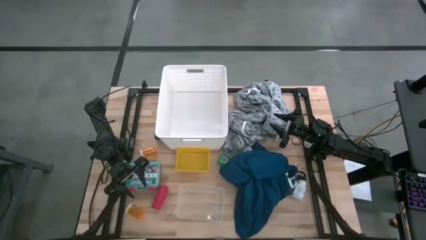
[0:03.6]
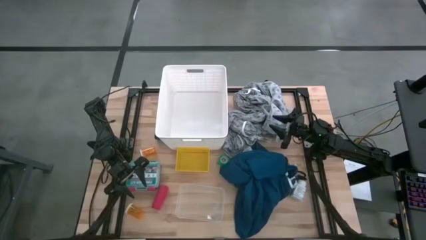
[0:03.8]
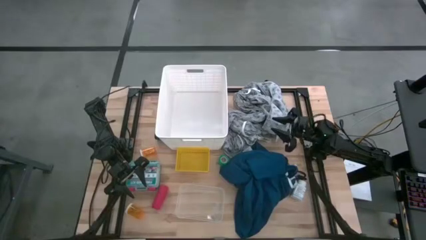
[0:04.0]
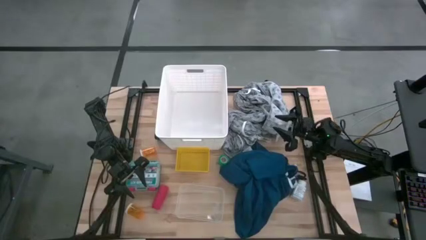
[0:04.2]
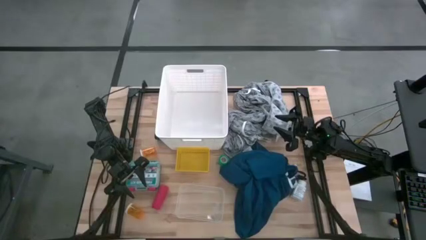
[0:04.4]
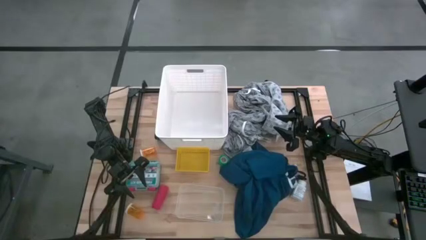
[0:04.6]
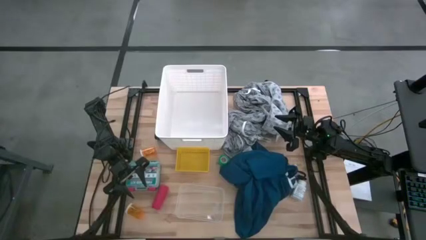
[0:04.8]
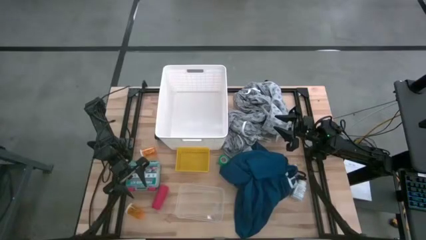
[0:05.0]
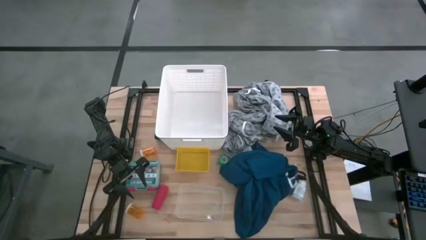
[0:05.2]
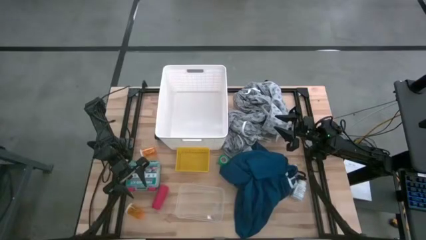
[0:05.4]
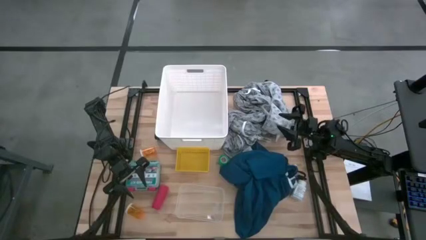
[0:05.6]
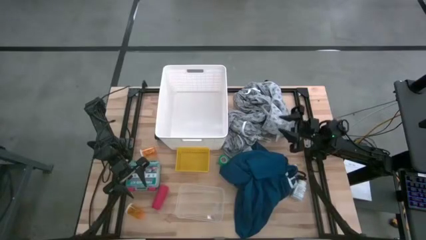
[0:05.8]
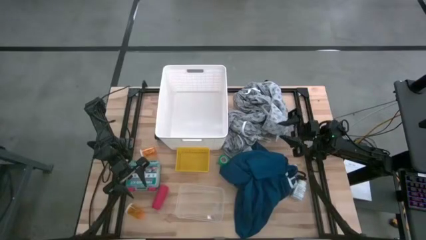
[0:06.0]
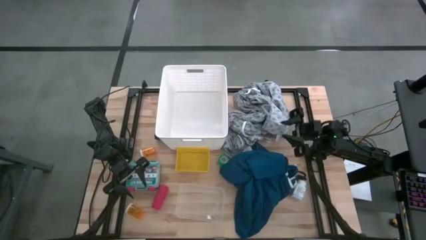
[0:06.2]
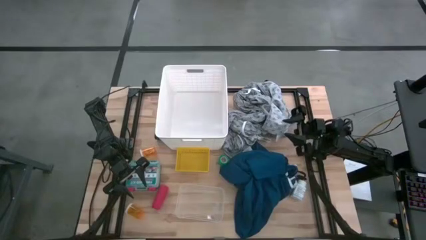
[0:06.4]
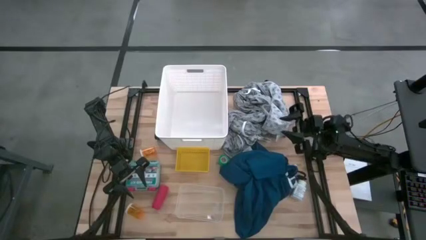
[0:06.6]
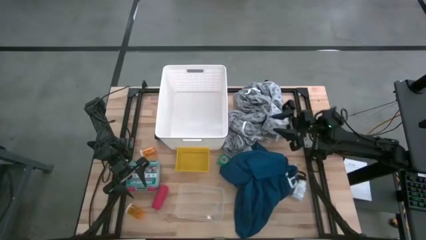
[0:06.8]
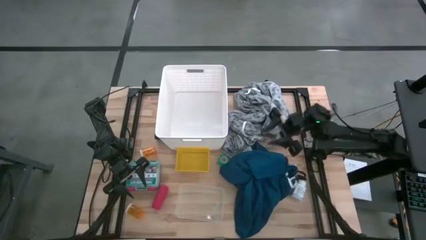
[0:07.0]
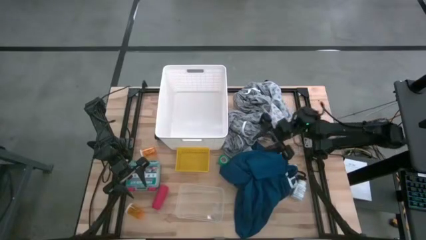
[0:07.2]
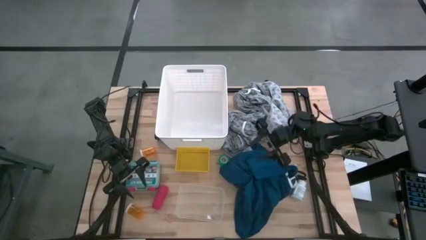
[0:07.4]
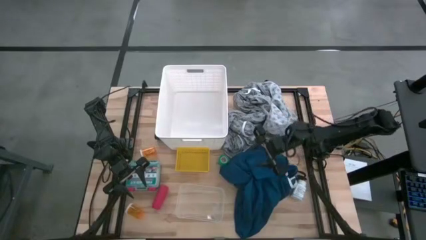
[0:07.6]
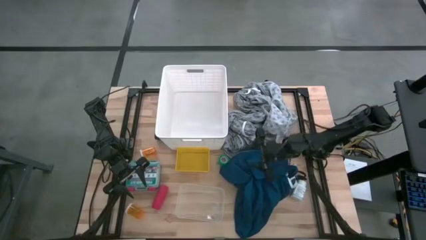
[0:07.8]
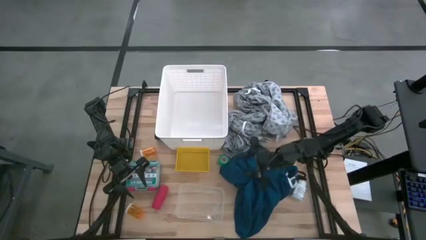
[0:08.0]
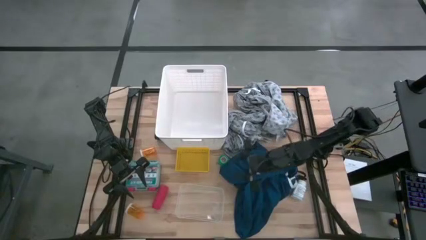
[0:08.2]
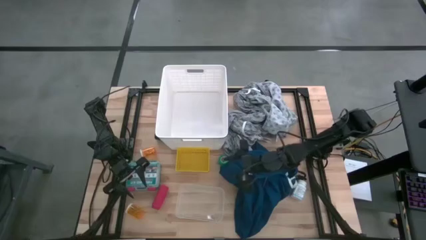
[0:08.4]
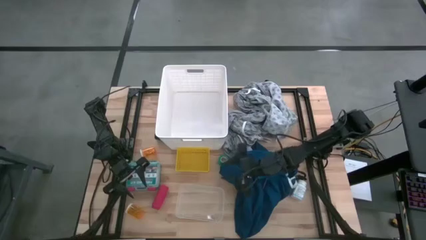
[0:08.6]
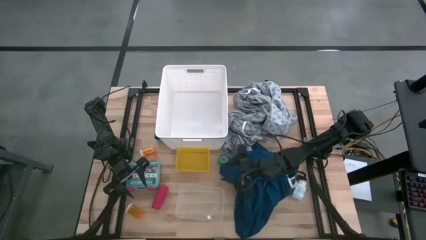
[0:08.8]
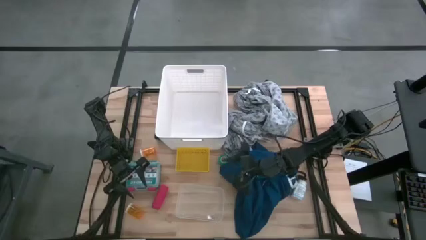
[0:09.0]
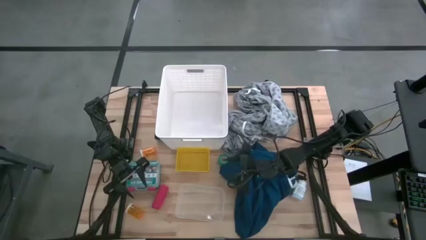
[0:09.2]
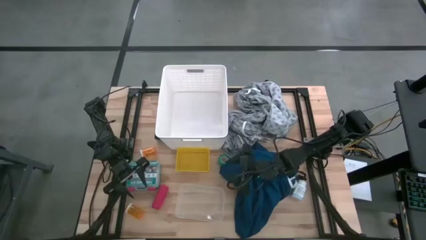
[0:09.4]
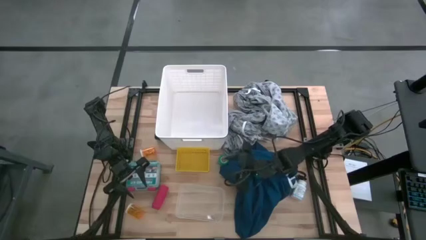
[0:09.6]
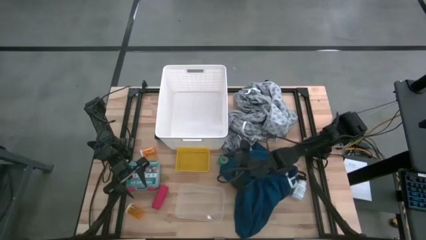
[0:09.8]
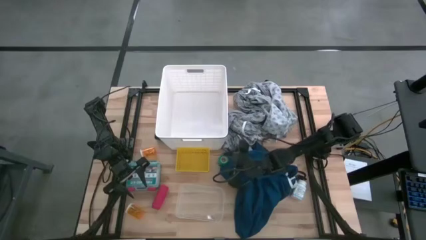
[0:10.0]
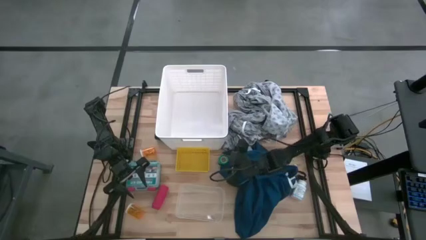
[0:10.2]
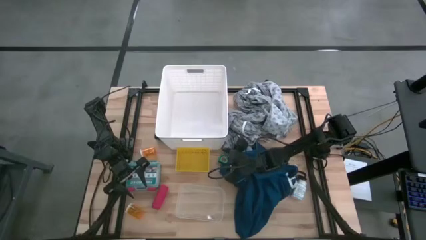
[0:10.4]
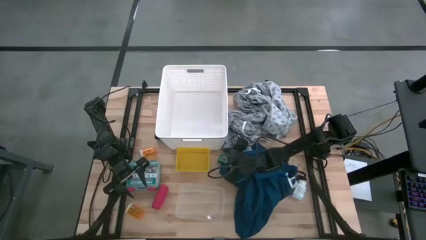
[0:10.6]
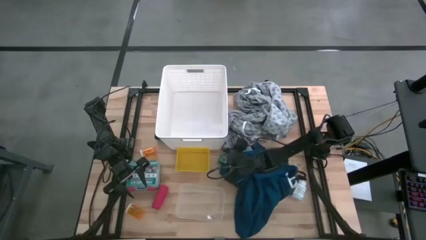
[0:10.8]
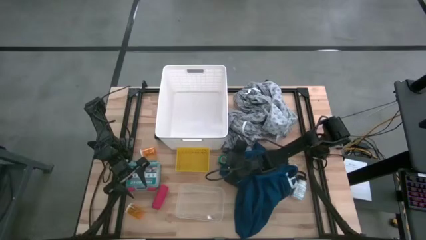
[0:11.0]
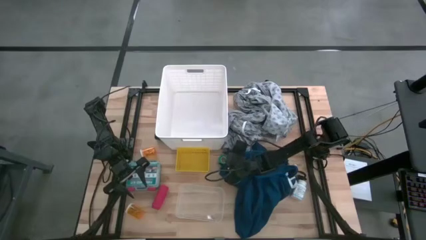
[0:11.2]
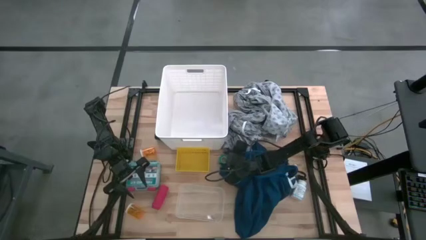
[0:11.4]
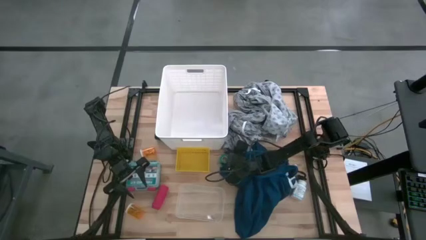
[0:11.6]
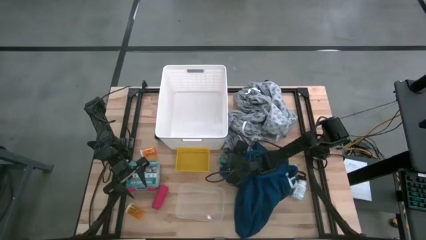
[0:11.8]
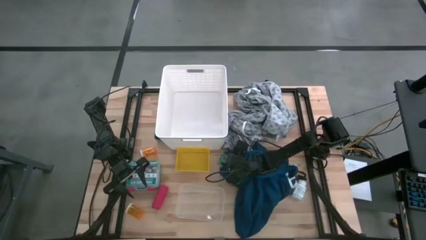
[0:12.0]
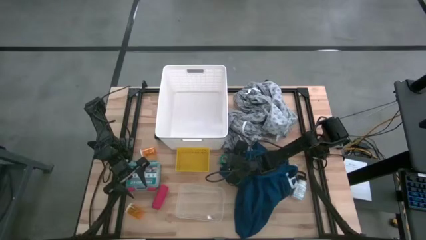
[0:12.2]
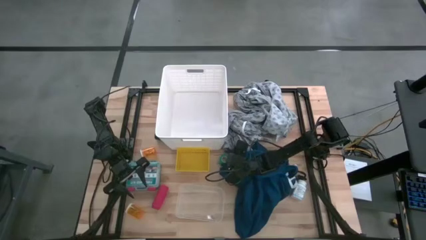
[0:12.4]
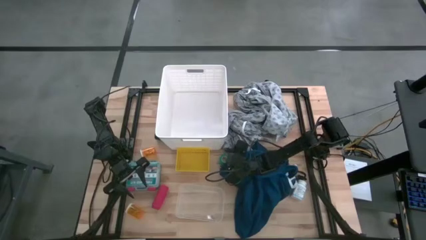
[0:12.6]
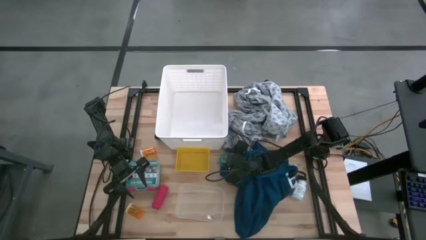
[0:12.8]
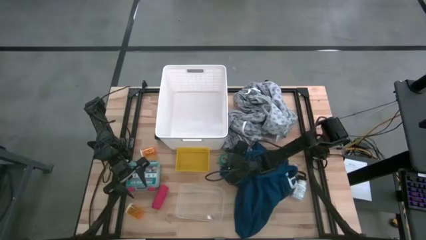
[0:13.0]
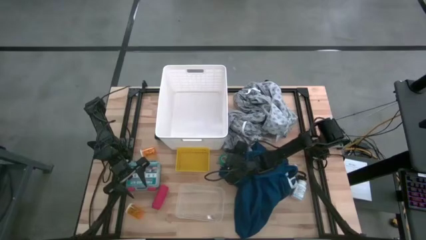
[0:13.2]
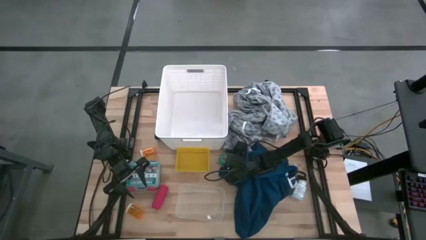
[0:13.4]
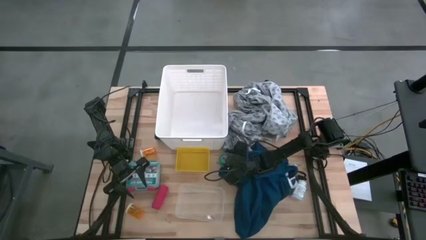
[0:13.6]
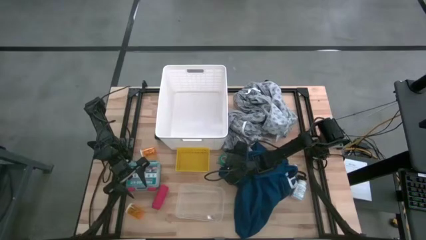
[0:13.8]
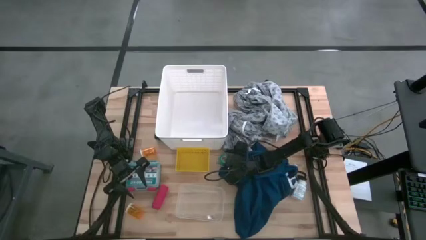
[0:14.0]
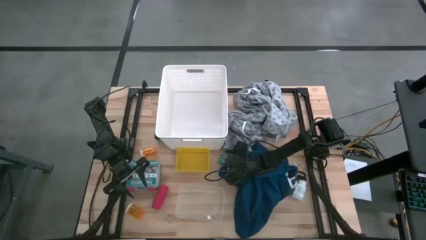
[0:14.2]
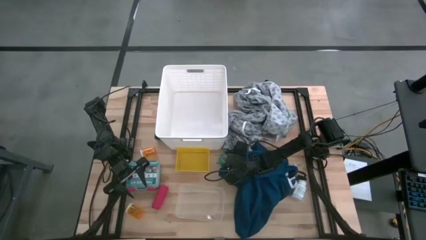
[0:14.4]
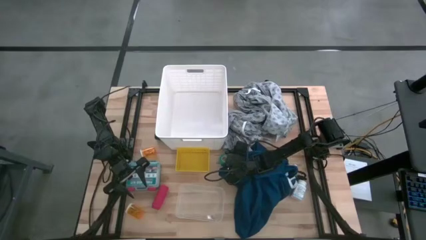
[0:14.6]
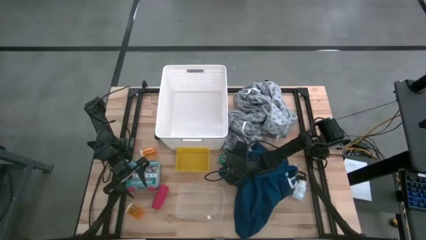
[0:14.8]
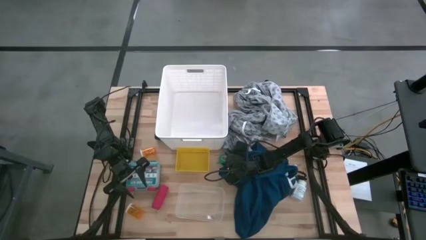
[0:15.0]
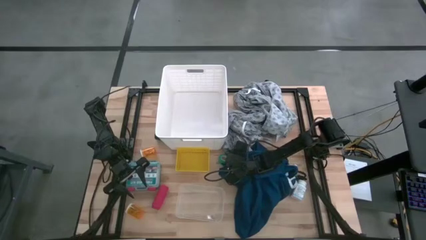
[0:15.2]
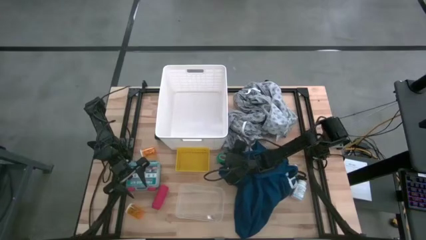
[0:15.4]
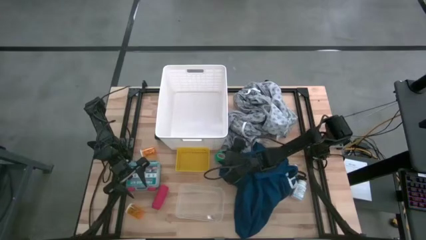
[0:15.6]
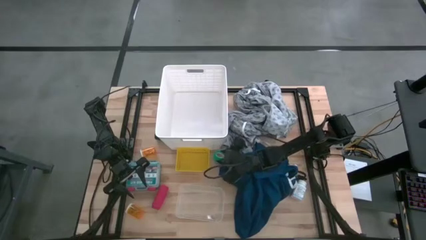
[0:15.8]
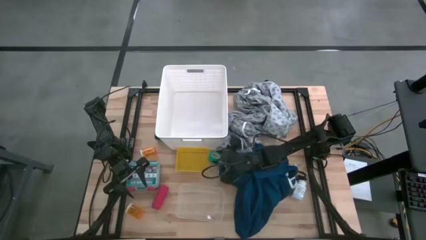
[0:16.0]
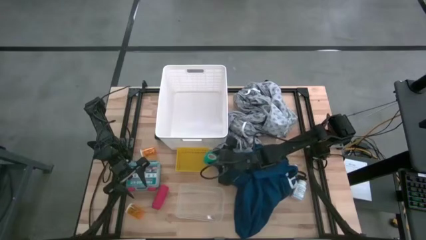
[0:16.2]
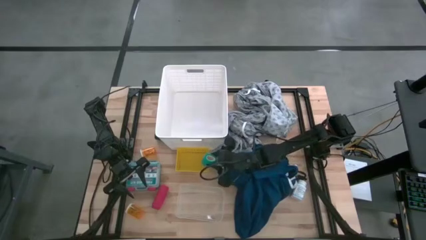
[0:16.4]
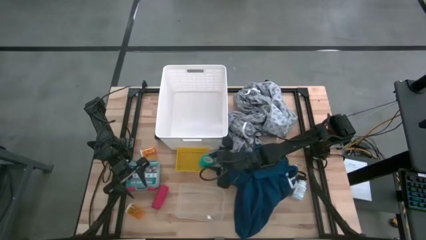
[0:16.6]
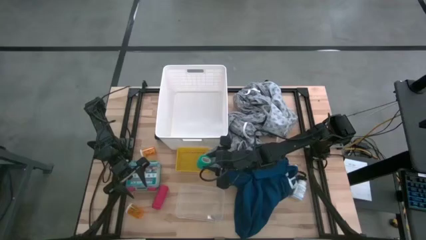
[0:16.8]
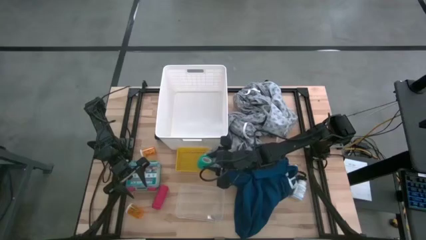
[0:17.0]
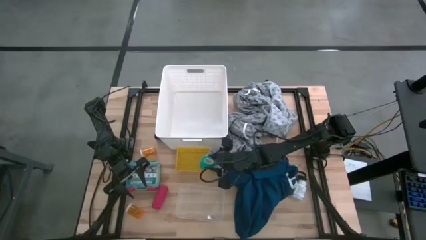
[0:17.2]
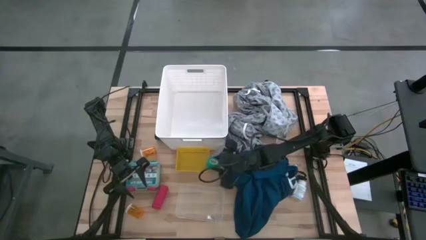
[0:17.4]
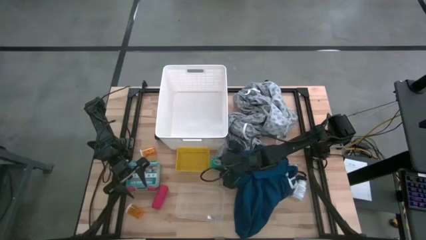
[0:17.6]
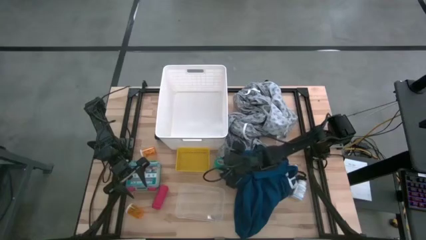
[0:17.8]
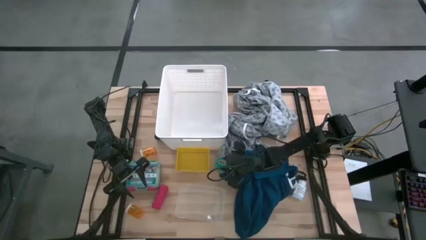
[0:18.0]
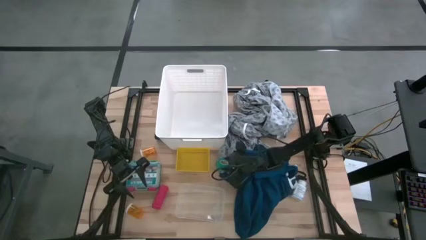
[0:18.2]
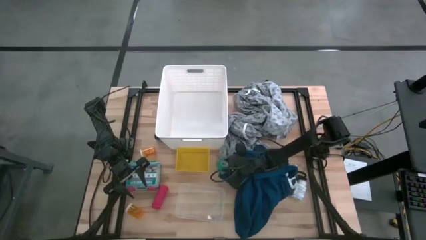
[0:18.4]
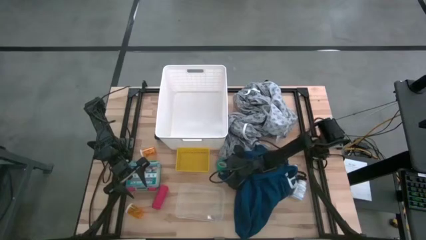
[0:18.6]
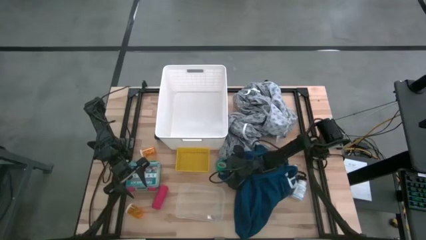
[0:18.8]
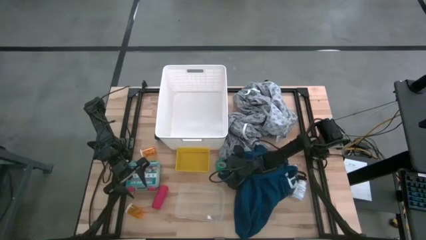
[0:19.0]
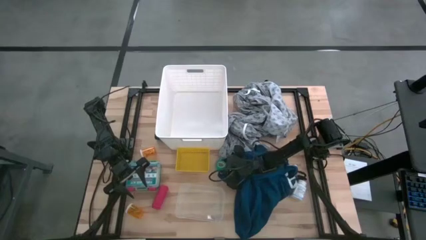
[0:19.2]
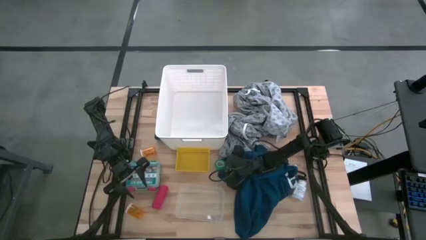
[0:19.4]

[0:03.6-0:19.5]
Task: Pick & Place Medicine items
Put the blue bandage into the yellow bin
